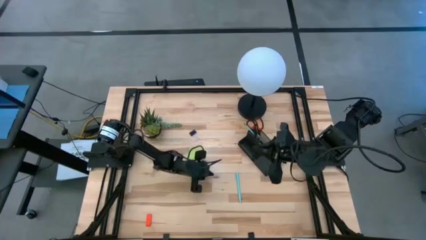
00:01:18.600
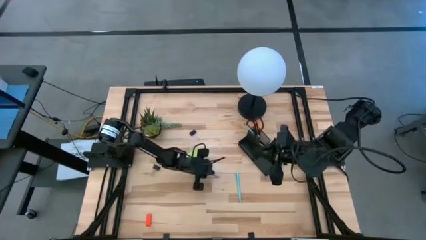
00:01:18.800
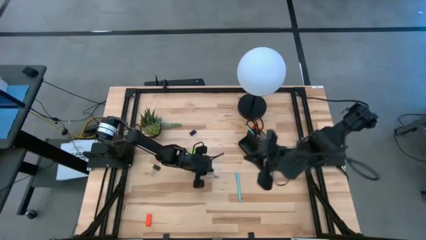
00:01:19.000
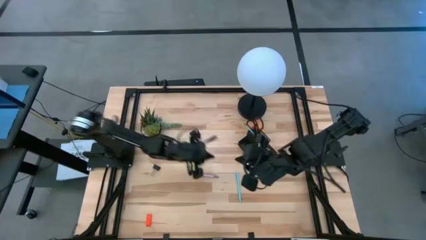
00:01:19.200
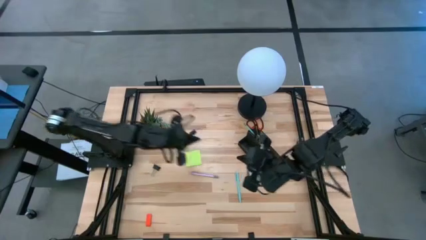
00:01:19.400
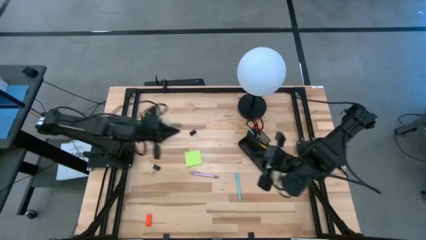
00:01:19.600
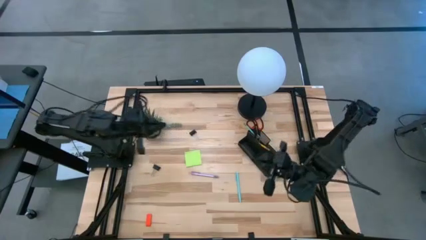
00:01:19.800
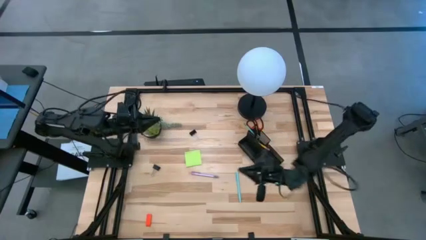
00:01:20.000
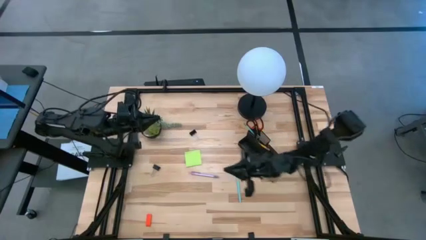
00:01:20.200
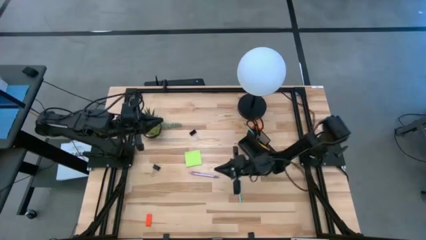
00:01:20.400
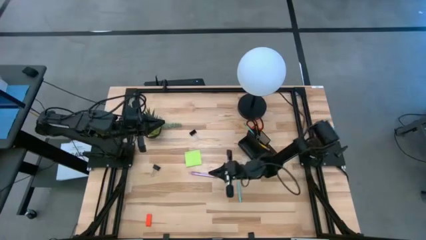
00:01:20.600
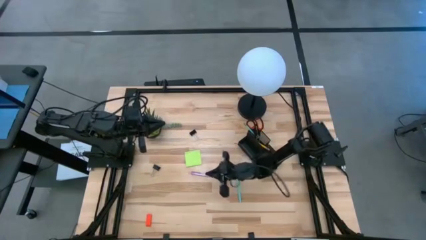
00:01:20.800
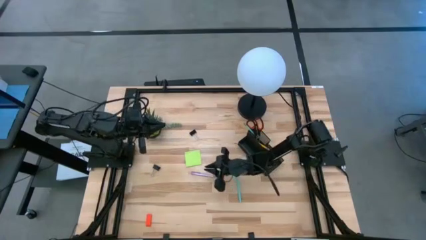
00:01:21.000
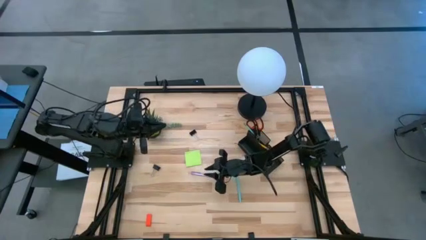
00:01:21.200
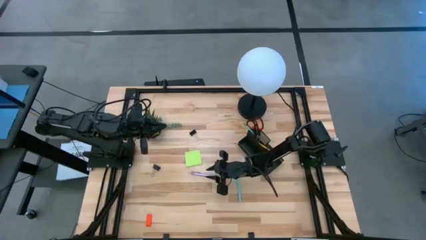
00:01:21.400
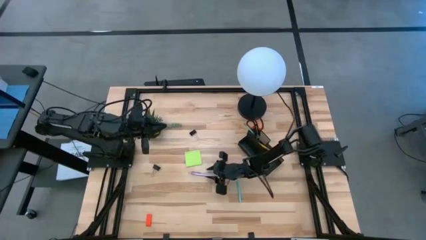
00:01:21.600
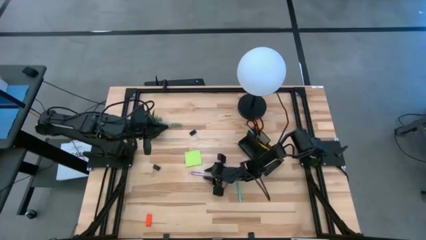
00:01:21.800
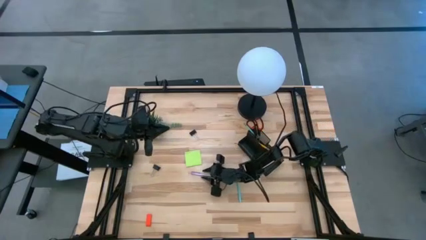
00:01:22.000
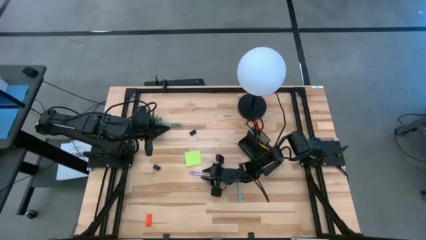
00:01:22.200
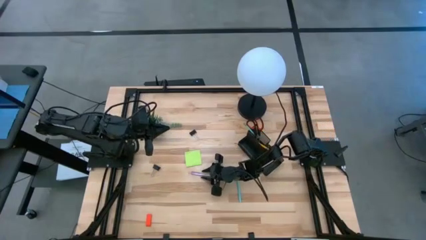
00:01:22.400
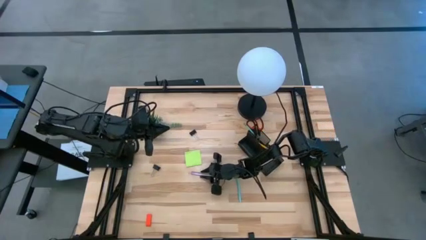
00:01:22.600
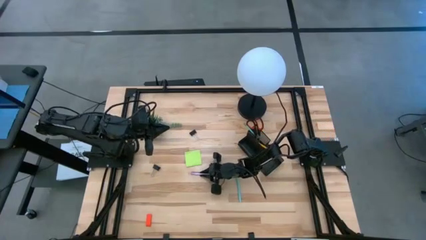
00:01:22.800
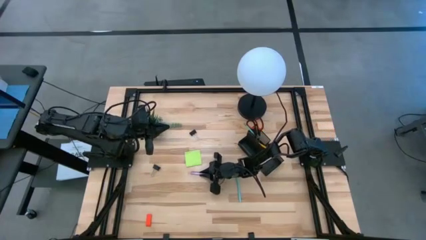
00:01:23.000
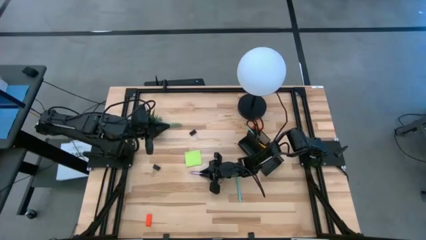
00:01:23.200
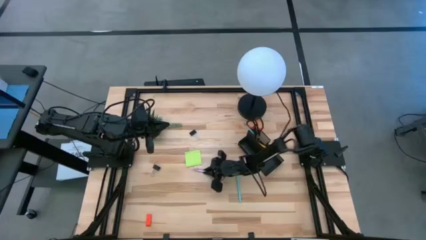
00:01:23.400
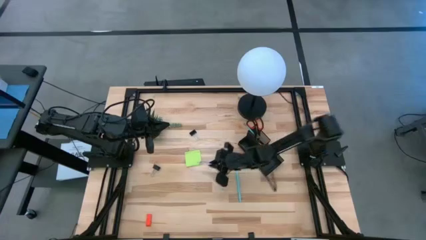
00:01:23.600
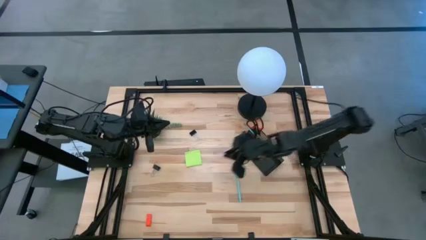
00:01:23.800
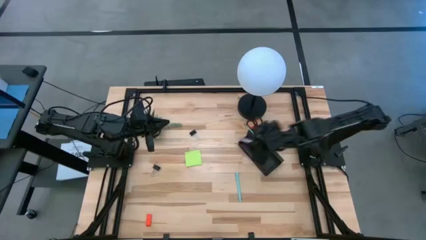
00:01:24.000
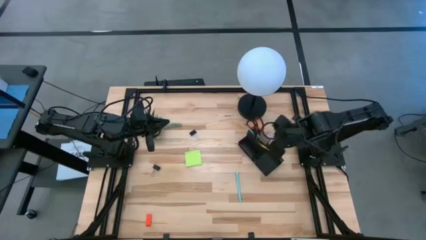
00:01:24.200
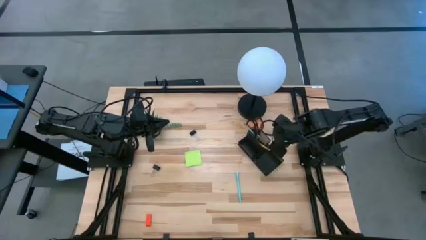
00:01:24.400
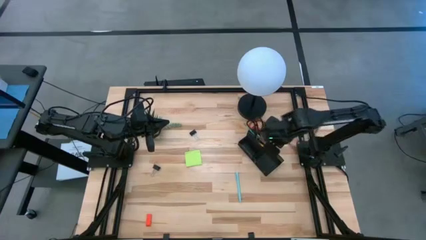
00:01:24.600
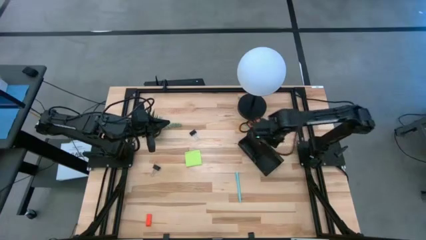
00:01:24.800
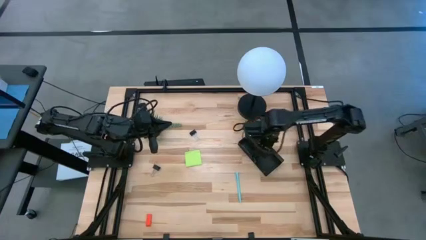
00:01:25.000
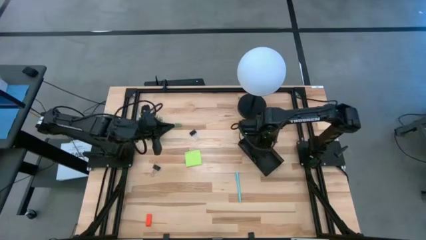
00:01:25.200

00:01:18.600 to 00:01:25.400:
Task: Pick and place office supplies into organizer
Put the purple pen into the black desk organizer

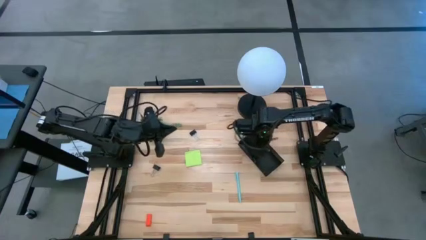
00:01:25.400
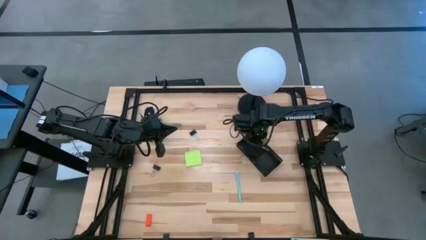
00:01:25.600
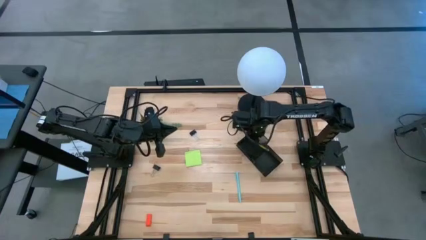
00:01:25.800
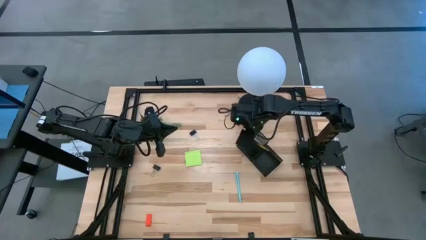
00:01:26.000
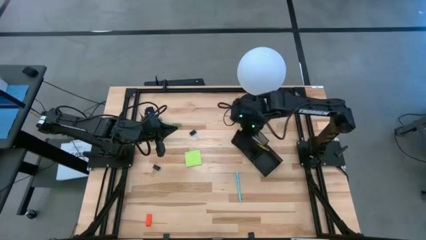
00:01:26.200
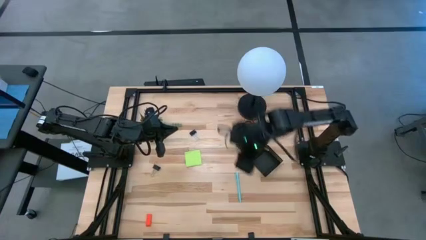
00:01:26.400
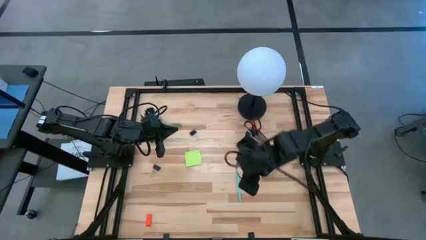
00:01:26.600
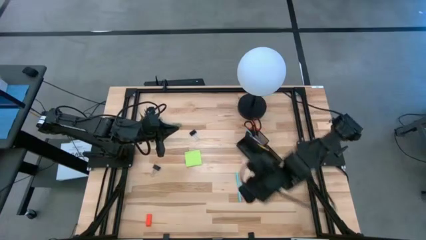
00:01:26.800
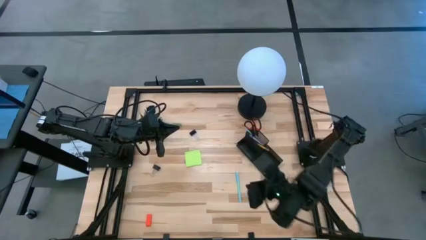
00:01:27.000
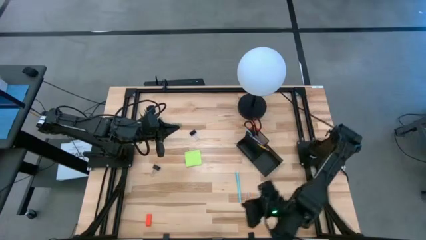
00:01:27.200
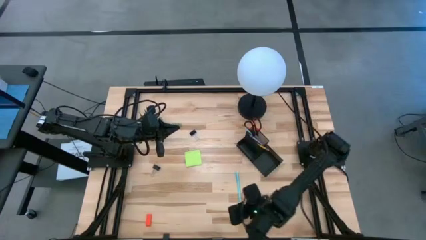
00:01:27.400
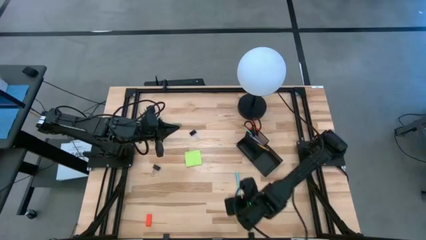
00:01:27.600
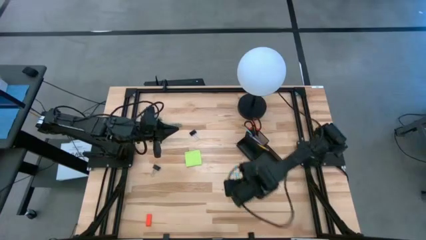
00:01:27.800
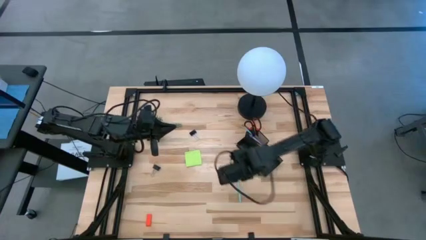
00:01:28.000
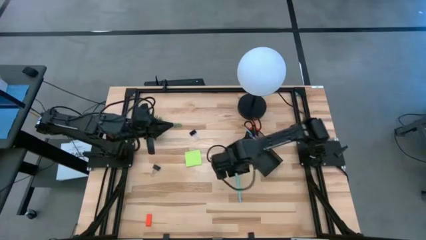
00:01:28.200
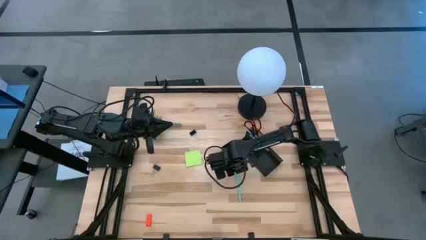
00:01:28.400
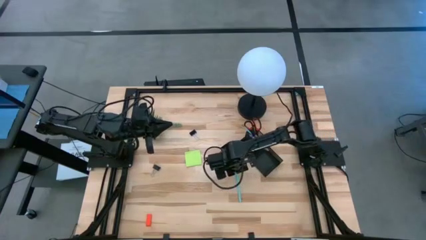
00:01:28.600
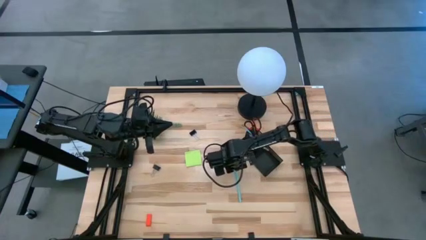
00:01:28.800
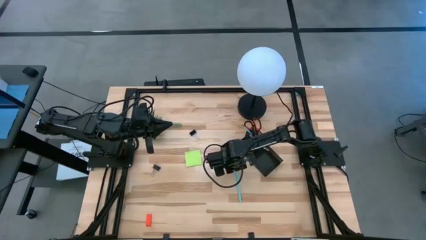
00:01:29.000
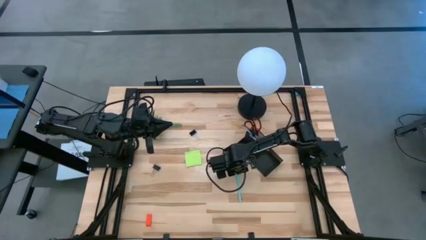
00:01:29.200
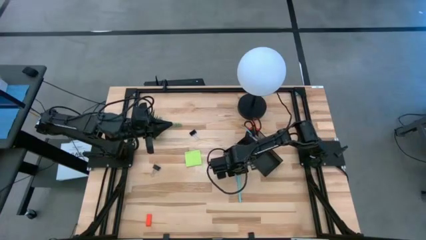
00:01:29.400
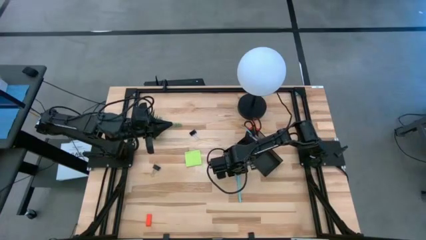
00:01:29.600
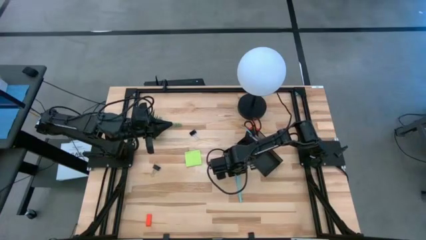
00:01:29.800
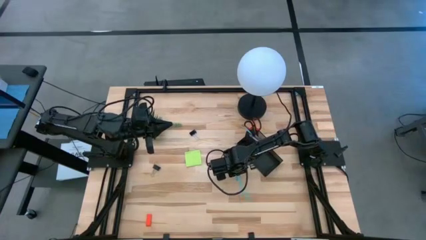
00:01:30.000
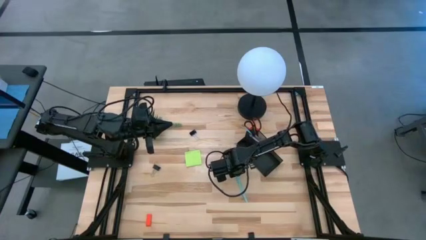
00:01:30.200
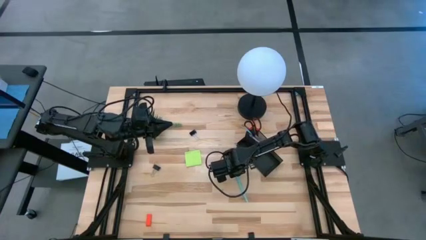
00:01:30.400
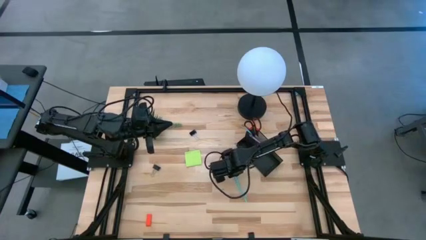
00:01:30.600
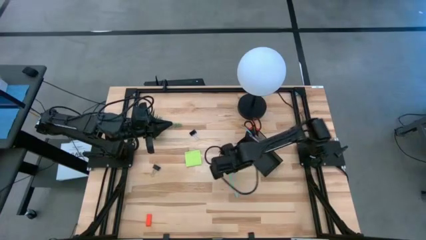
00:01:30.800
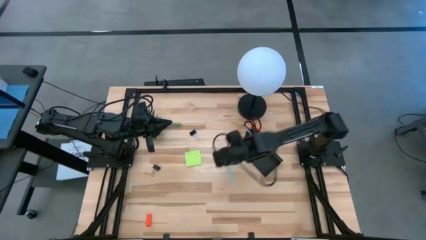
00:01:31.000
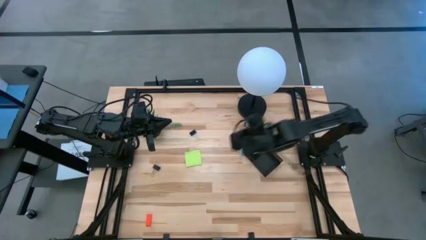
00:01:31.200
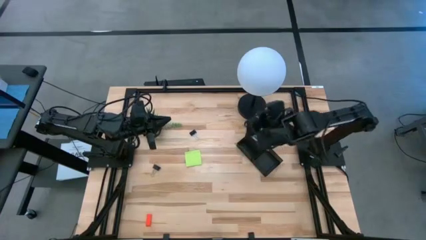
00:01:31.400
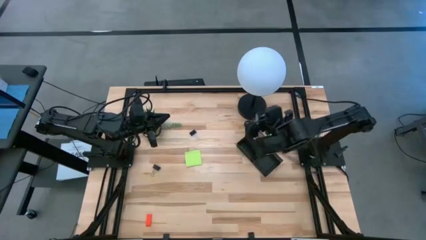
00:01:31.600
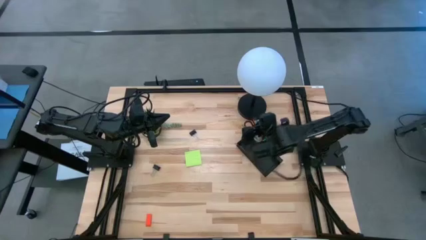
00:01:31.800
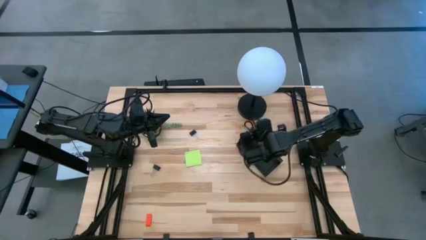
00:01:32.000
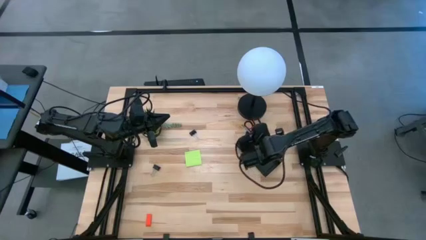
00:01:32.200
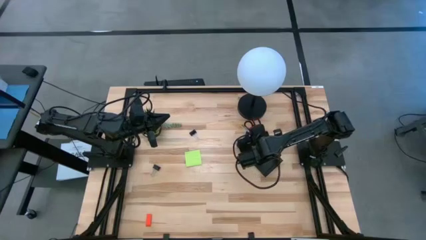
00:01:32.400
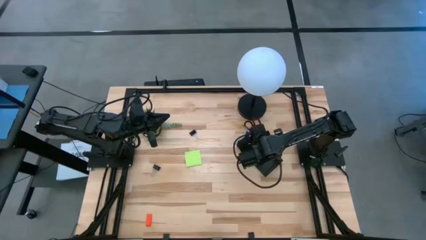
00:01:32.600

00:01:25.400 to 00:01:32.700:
Put the blue pen into the black desk organizer

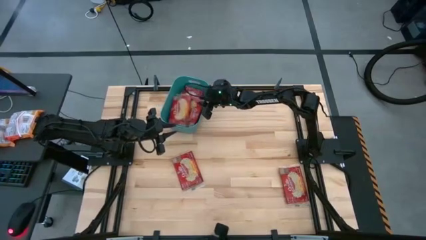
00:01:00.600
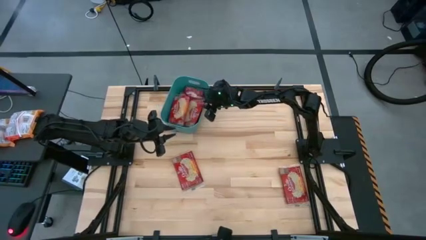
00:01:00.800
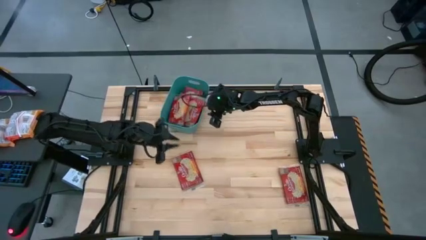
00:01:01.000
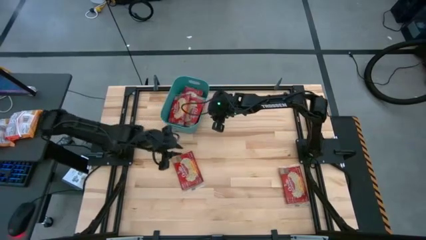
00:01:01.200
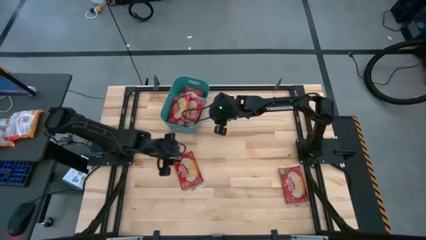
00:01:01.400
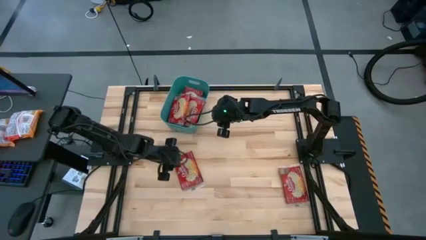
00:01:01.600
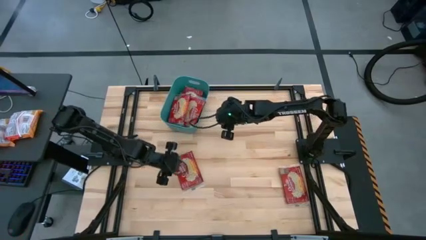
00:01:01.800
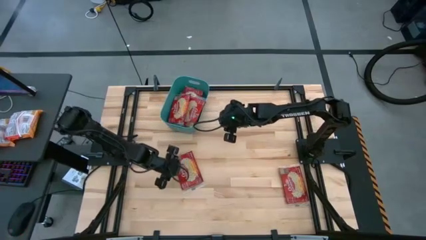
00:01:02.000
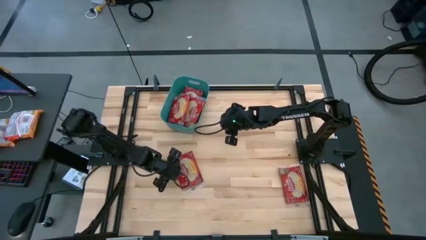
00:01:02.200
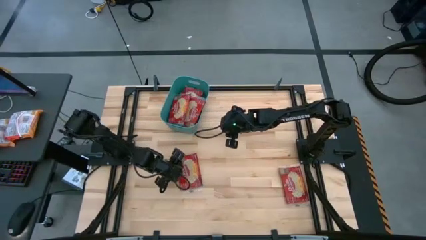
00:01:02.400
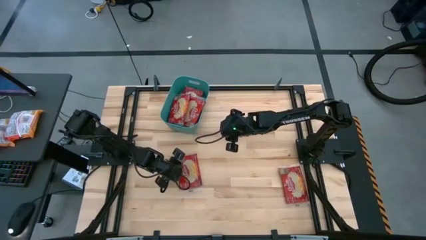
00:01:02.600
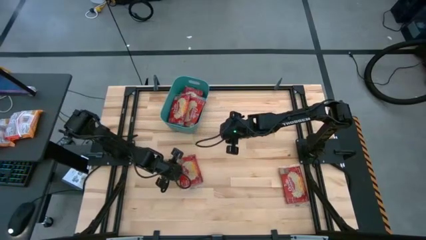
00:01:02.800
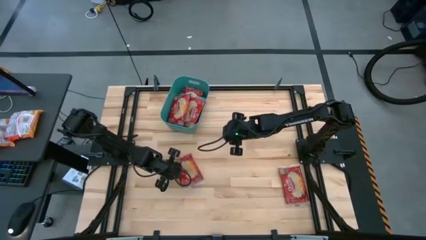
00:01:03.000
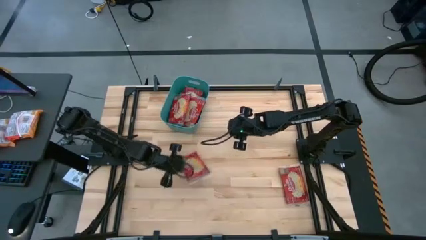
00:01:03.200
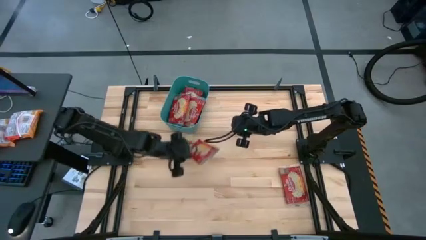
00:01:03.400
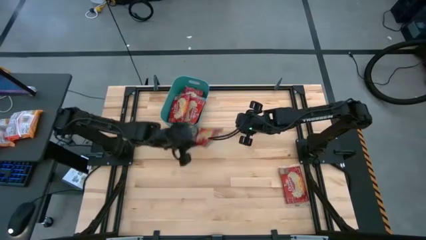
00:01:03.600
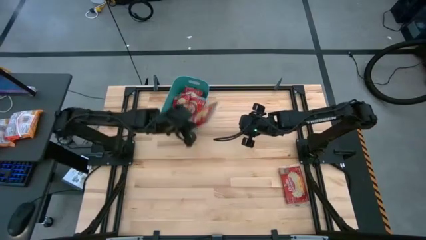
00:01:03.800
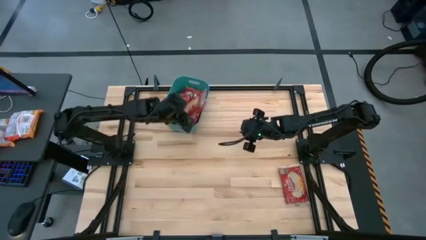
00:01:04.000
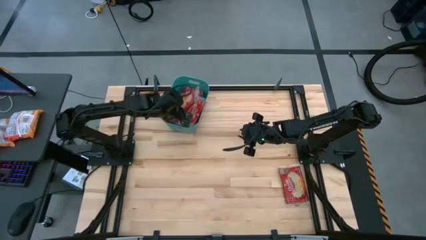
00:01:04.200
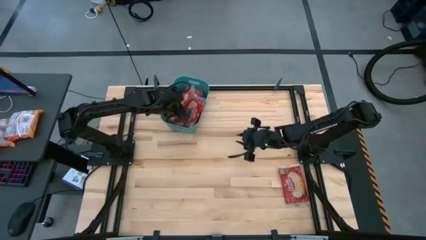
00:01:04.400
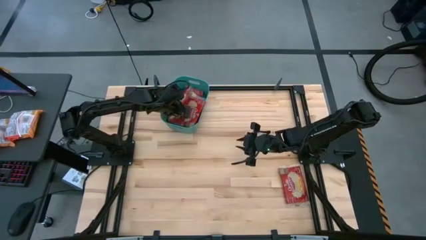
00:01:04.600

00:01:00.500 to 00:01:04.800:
Task: Sort popcorn bags into baskets
Put the red popcorn bag into the green bin
